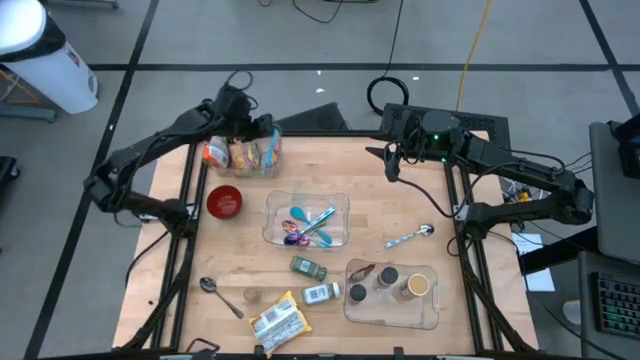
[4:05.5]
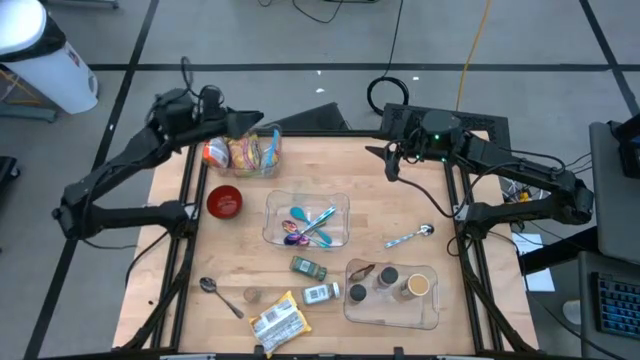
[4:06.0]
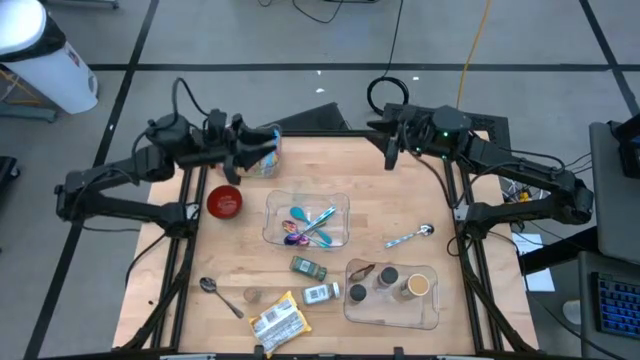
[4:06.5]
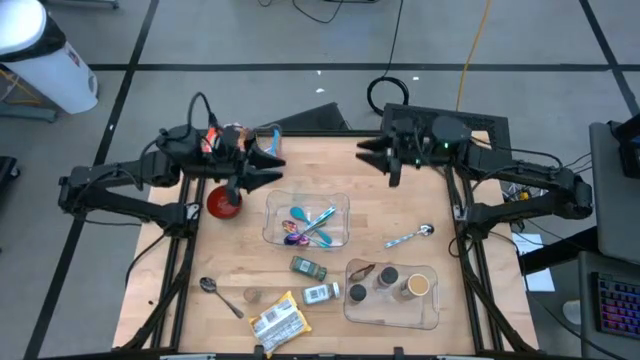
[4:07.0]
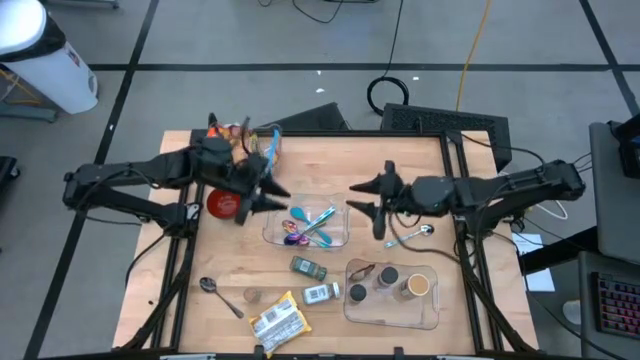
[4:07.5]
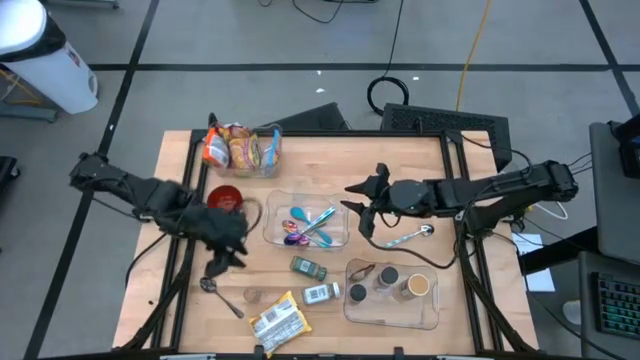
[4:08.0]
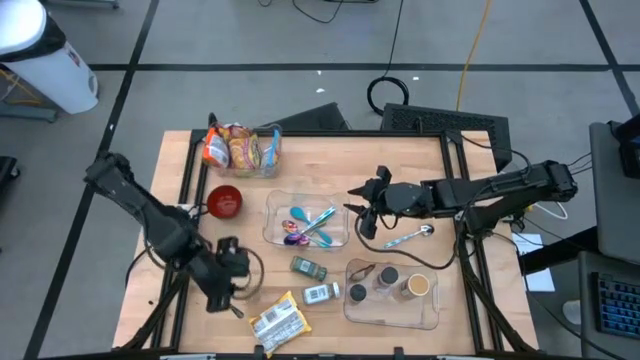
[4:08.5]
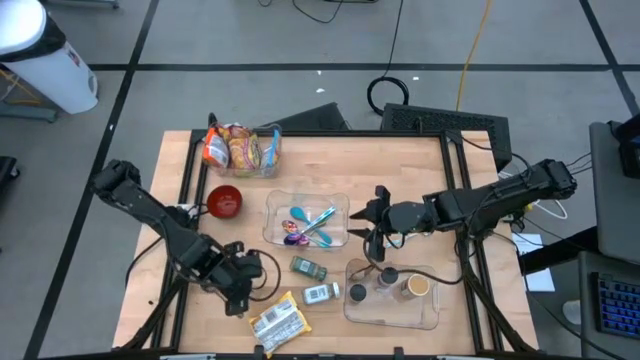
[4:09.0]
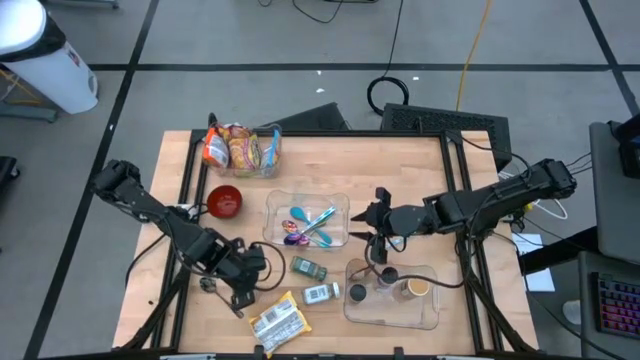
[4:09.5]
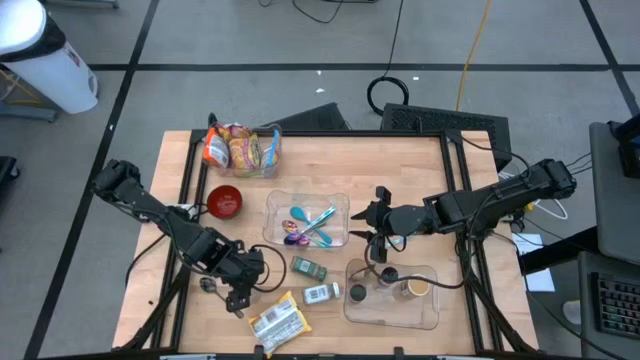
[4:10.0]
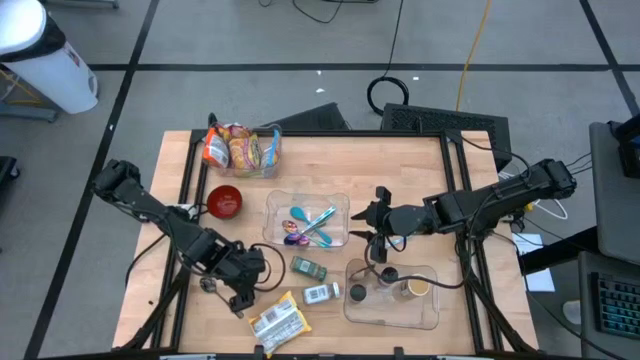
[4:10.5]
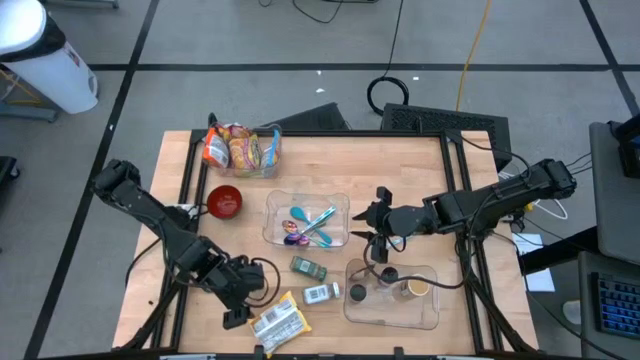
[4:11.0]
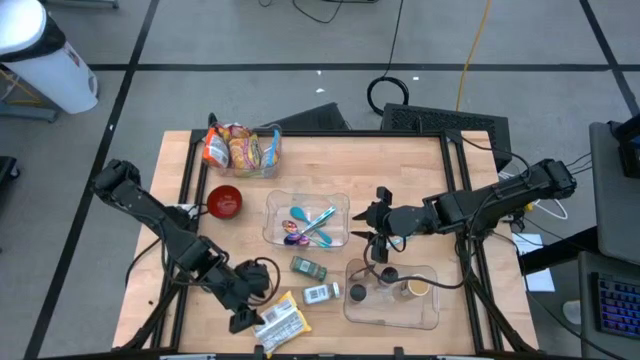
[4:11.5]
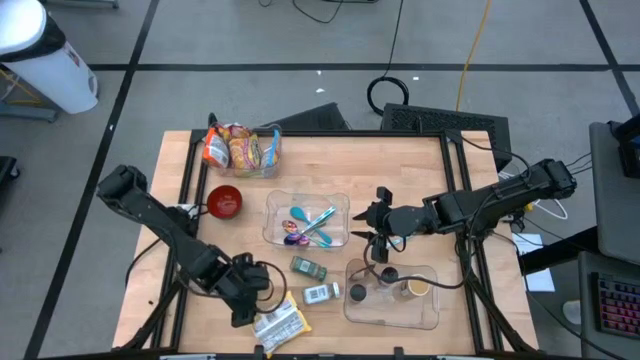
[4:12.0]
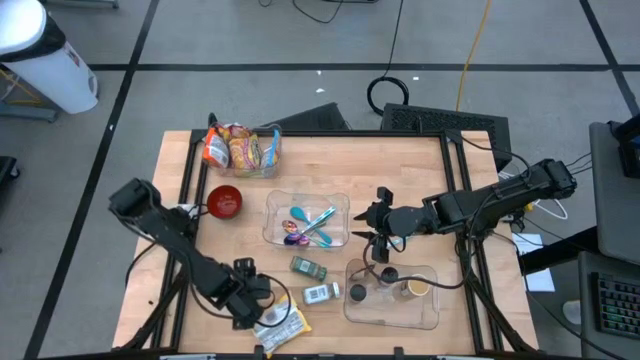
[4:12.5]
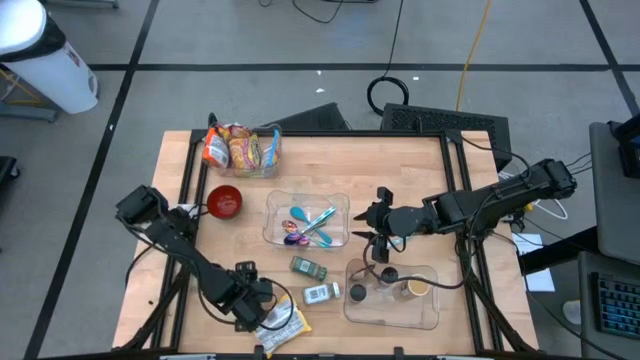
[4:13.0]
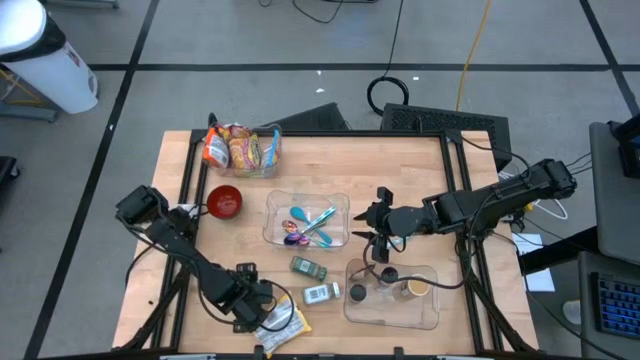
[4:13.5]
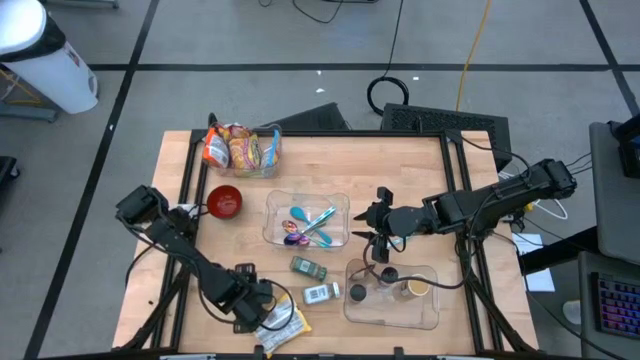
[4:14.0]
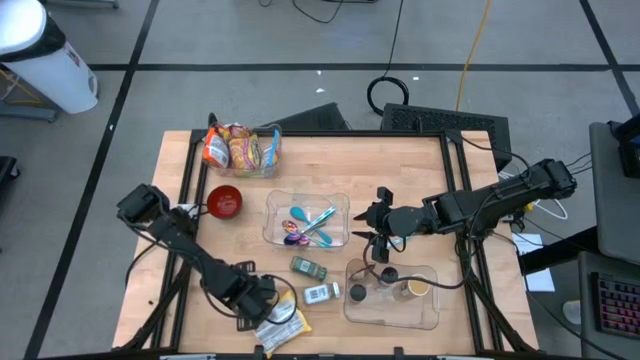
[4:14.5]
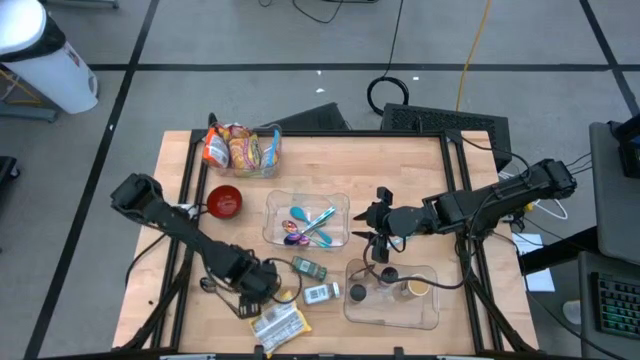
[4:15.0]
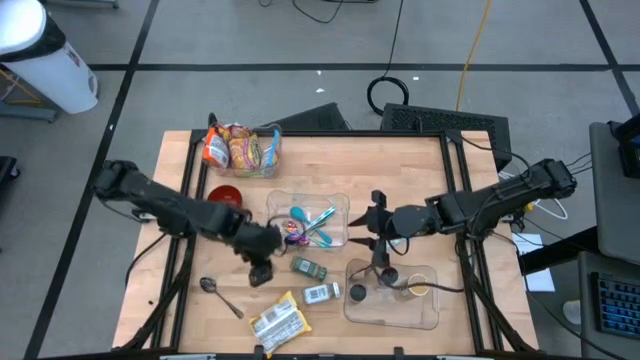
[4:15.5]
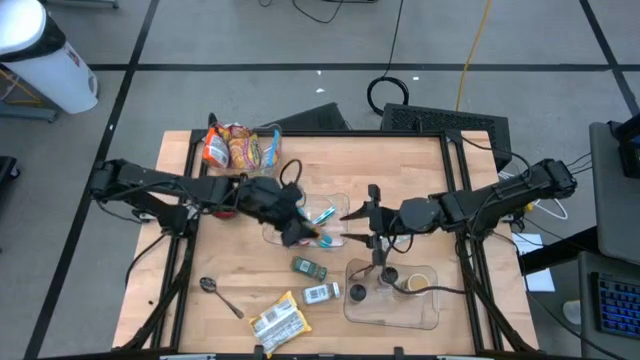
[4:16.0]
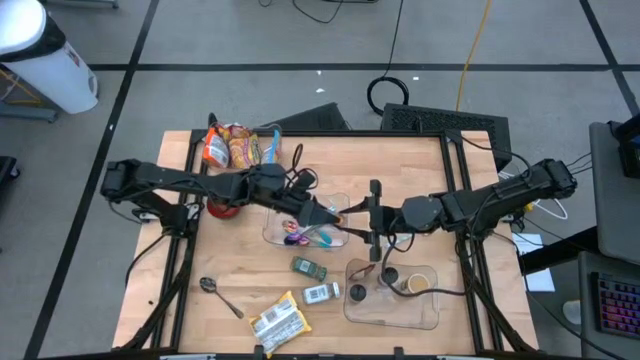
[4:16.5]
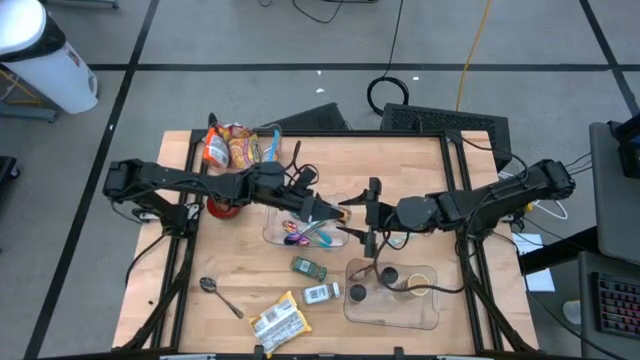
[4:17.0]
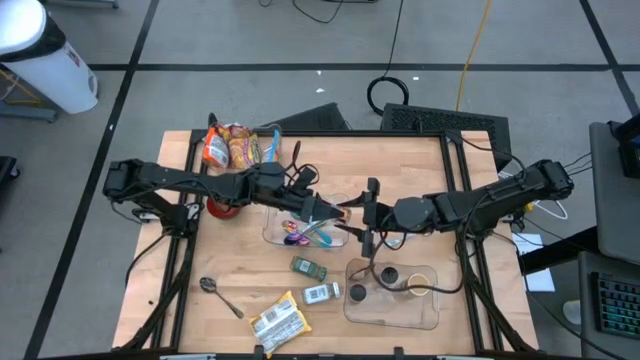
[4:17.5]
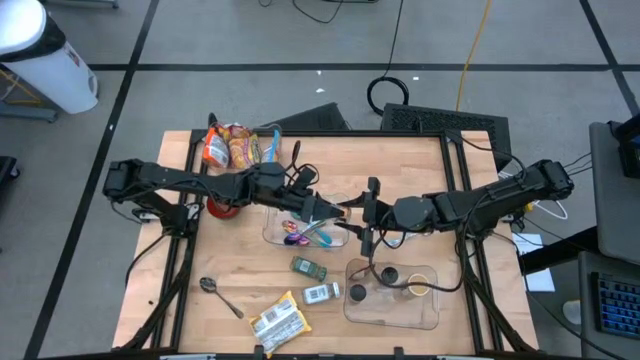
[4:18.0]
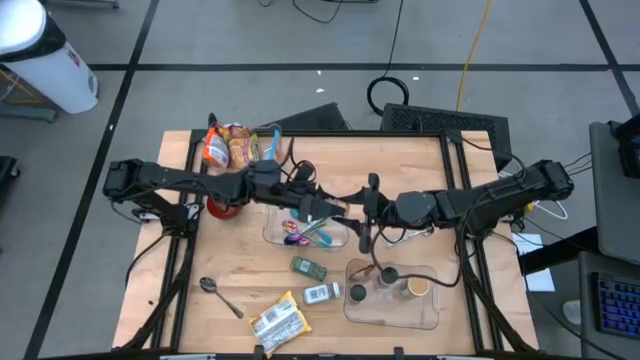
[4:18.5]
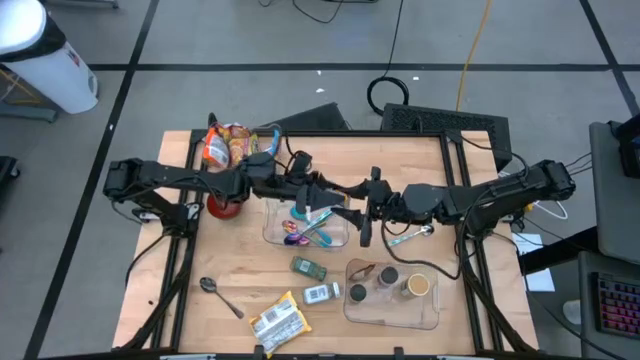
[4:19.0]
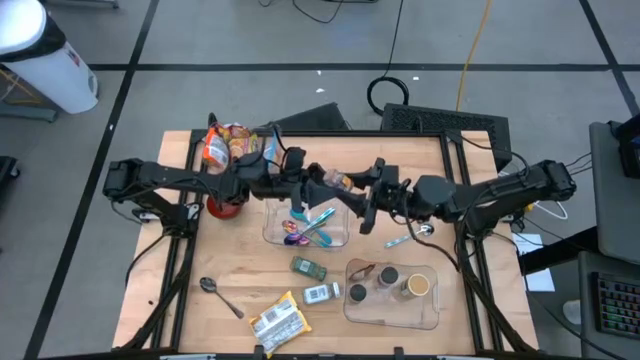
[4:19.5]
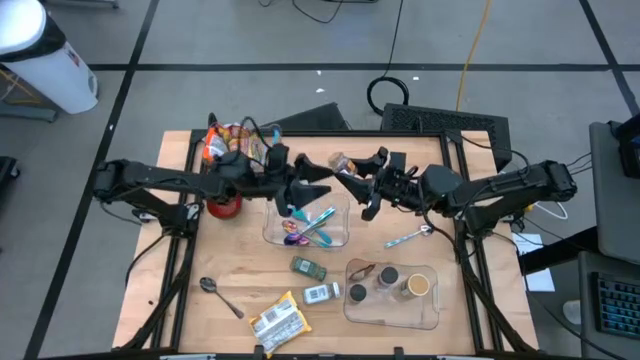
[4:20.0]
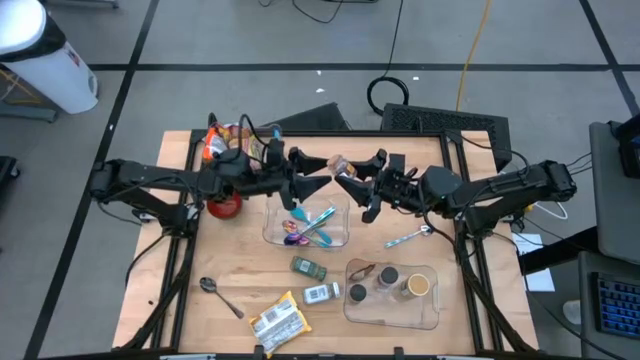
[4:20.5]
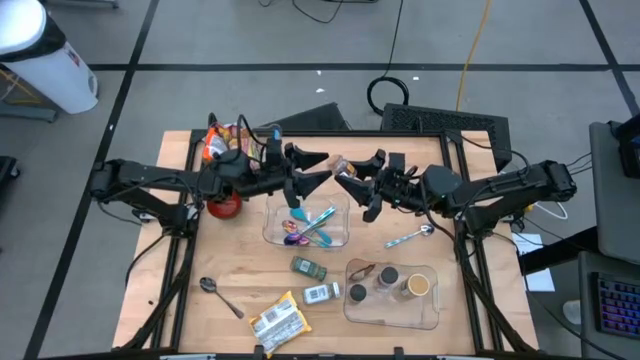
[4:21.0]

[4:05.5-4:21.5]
Task: Pick & Place Food Item
Put the brown seasoning bottle into the bottom transparent bin

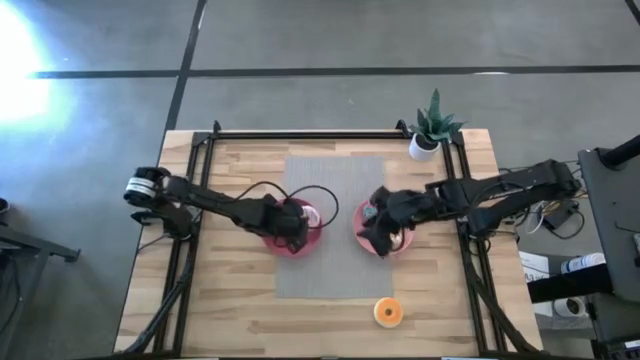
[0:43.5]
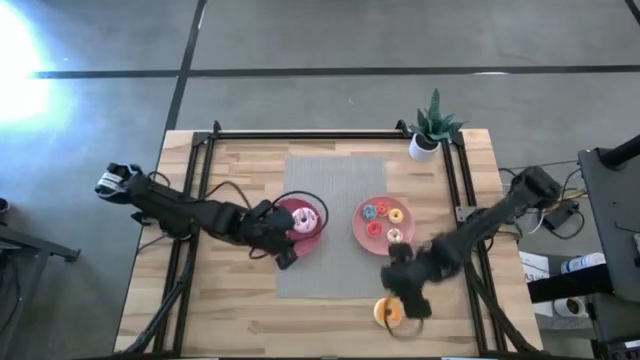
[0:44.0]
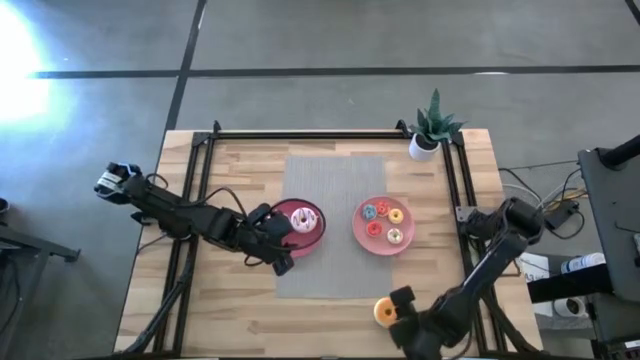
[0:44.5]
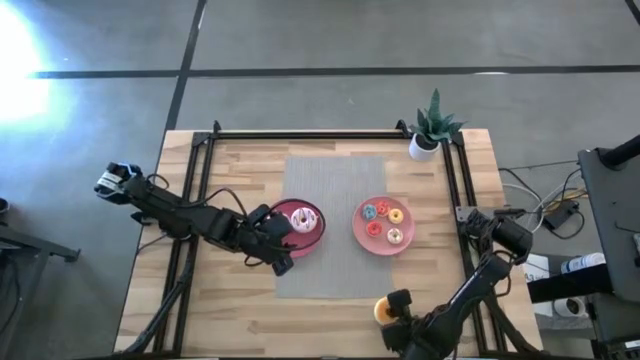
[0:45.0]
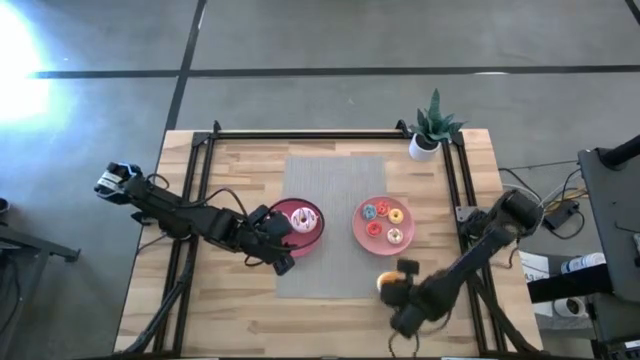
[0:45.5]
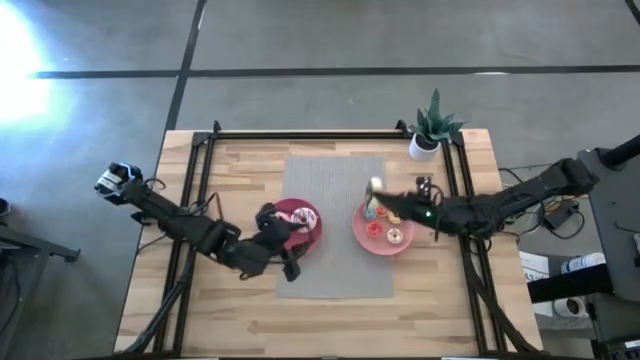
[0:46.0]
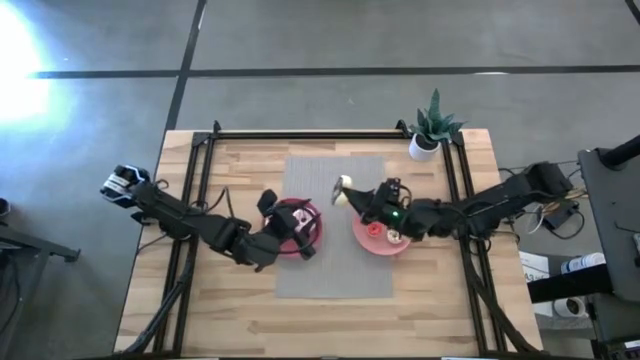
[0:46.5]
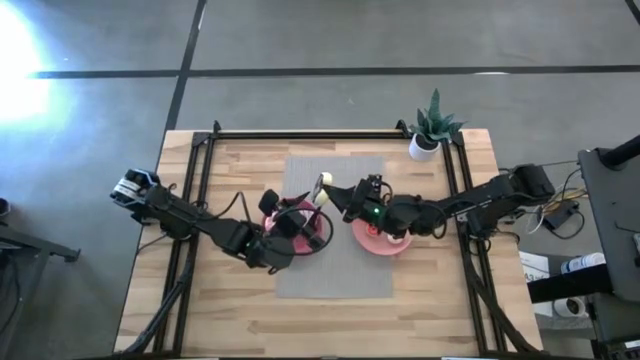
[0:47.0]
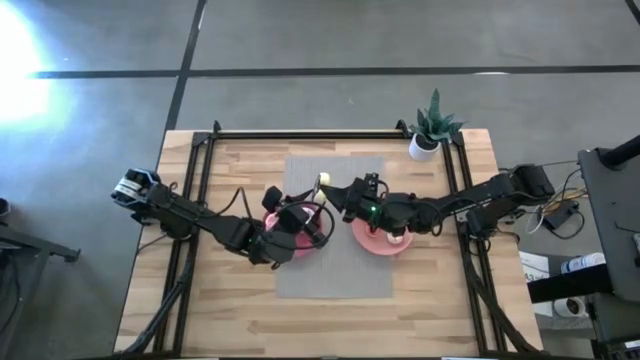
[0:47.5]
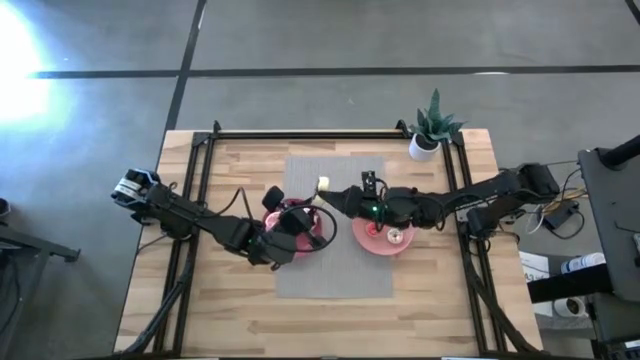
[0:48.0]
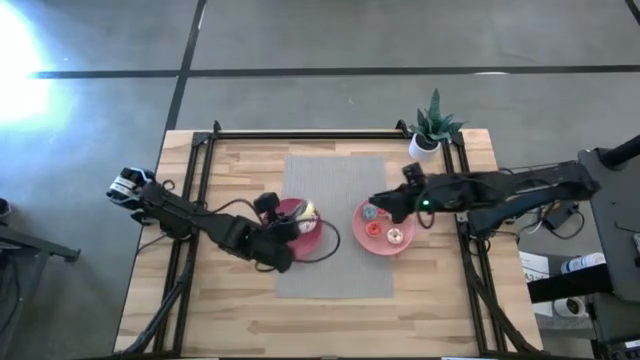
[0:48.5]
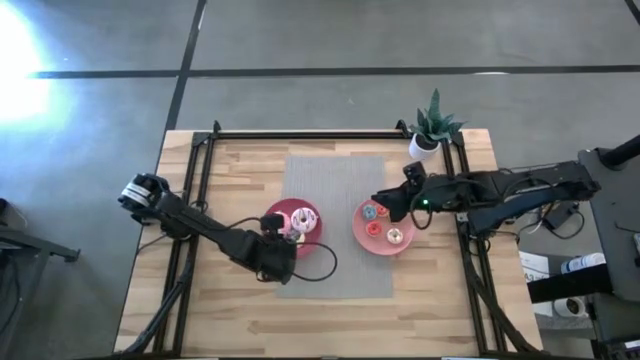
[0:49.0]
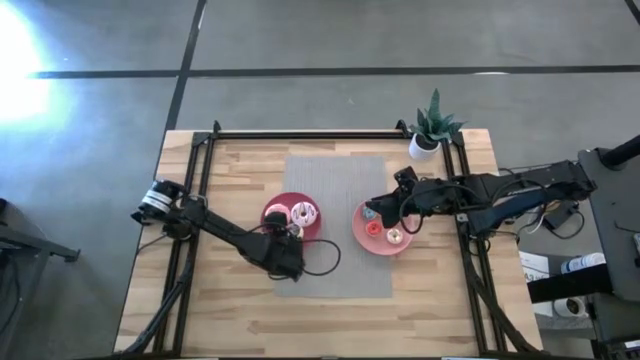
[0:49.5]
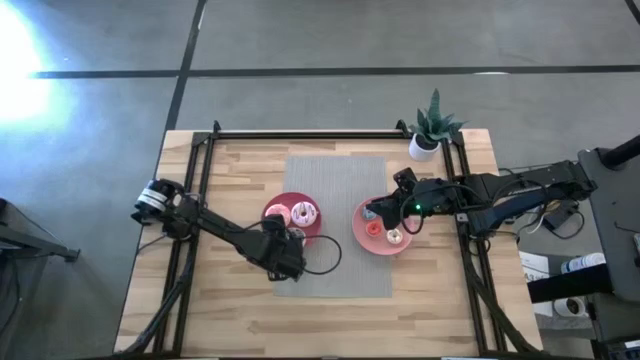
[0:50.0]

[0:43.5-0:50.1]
Task: Pick & Place donuts
Put the large black donut on the pink plate
